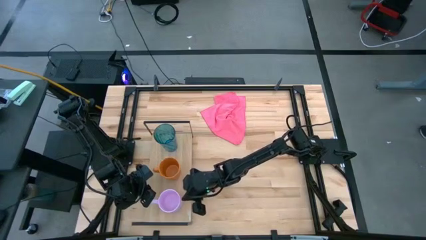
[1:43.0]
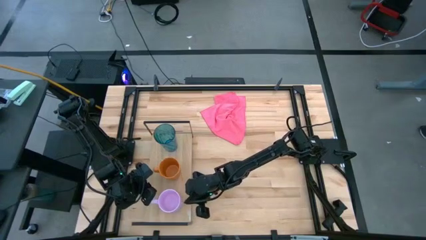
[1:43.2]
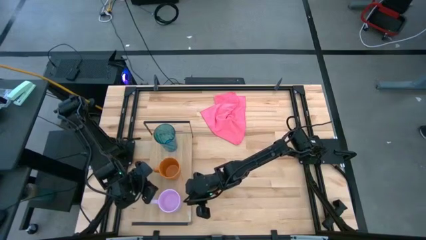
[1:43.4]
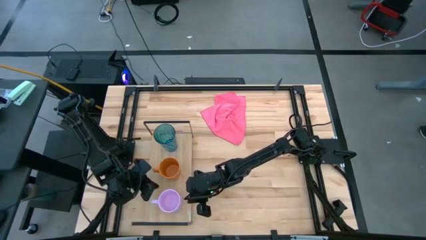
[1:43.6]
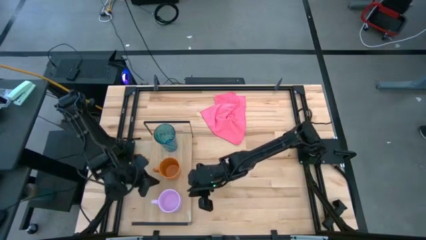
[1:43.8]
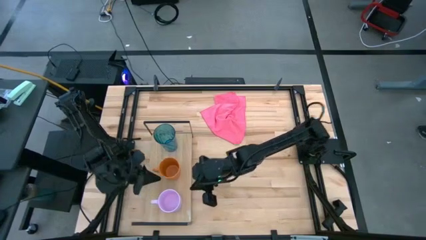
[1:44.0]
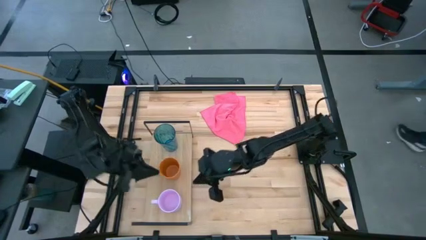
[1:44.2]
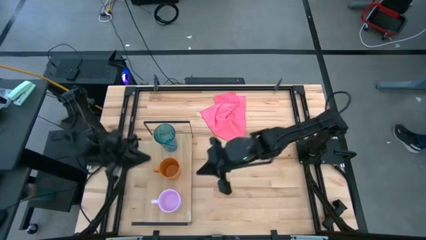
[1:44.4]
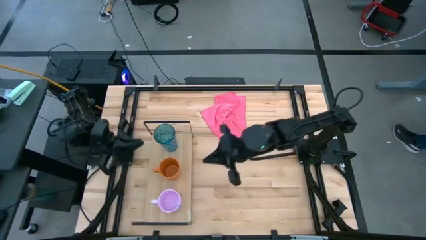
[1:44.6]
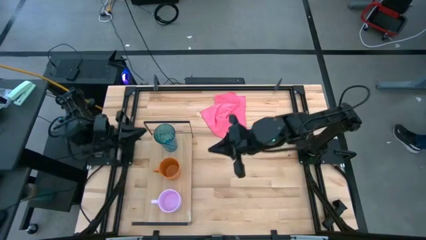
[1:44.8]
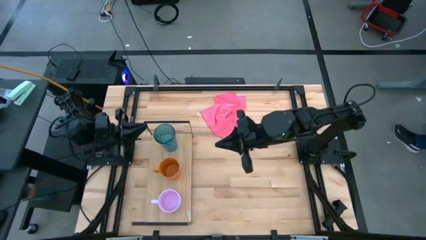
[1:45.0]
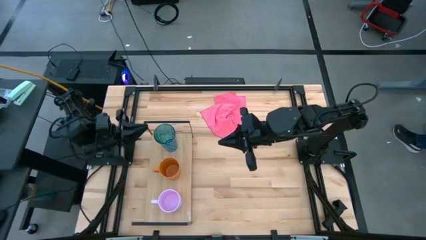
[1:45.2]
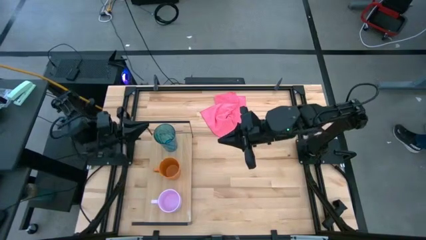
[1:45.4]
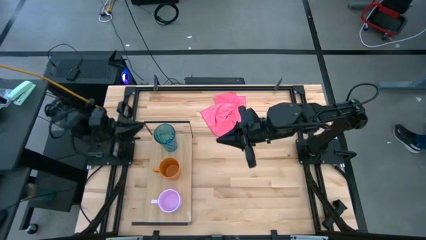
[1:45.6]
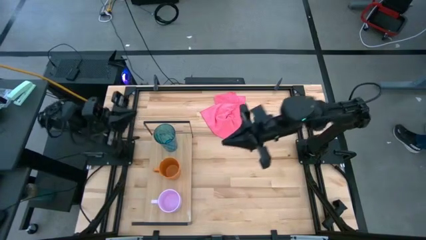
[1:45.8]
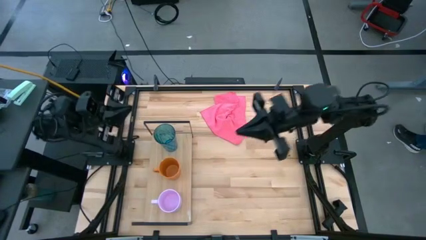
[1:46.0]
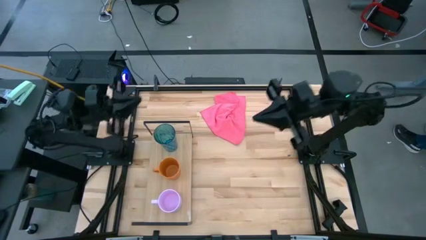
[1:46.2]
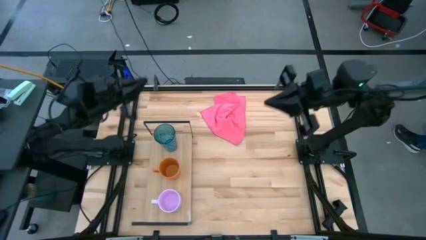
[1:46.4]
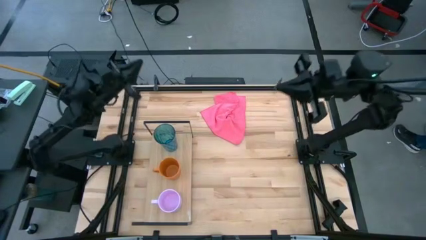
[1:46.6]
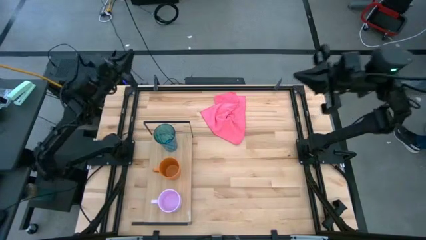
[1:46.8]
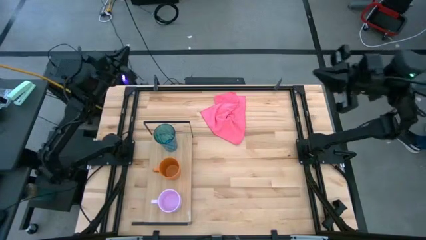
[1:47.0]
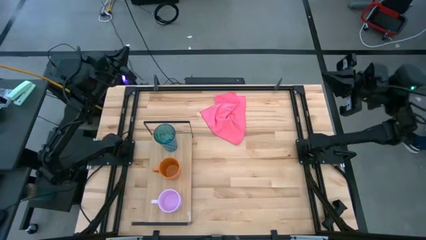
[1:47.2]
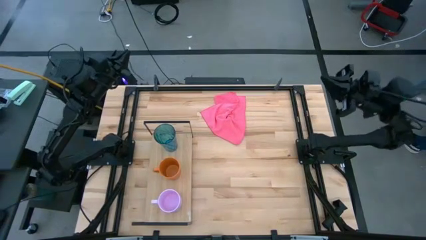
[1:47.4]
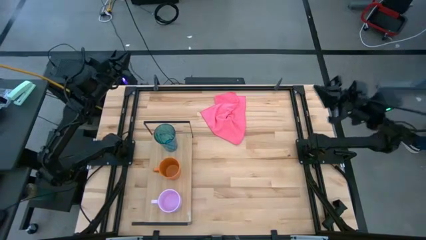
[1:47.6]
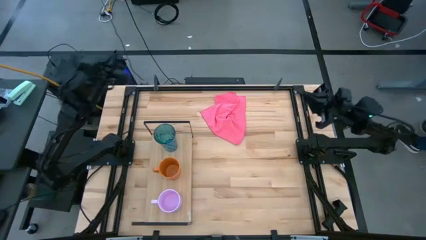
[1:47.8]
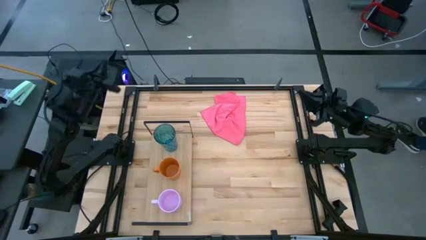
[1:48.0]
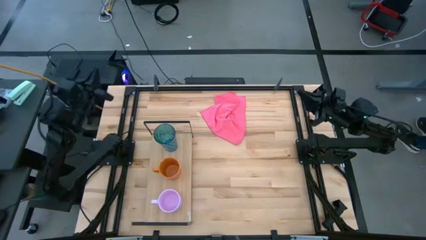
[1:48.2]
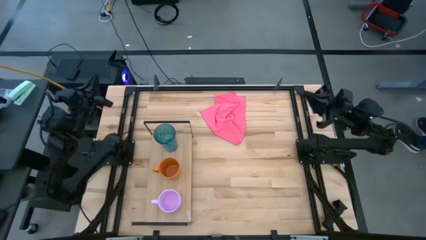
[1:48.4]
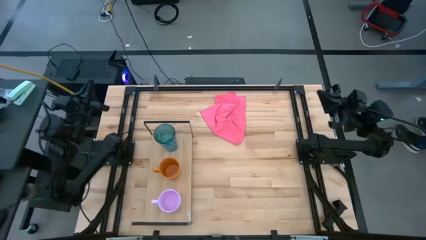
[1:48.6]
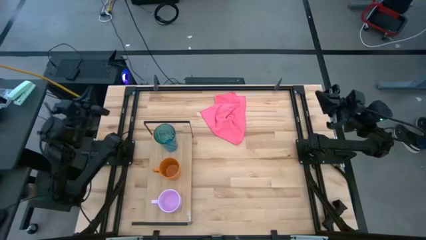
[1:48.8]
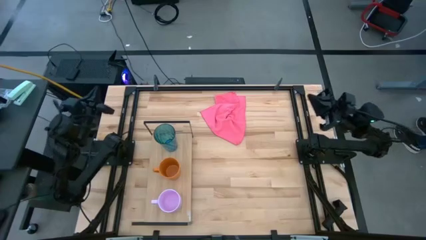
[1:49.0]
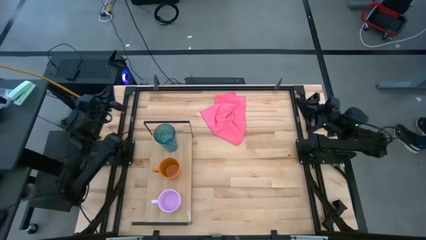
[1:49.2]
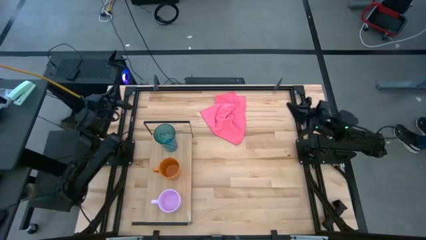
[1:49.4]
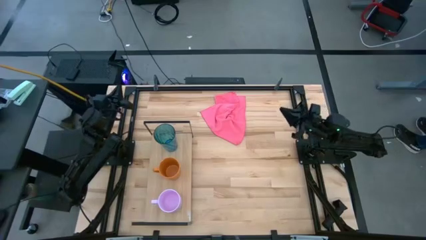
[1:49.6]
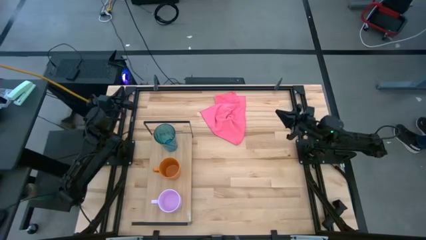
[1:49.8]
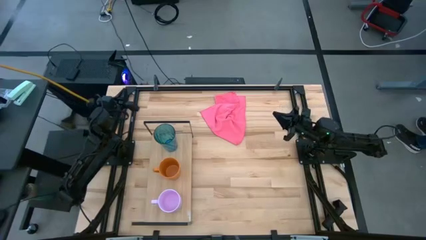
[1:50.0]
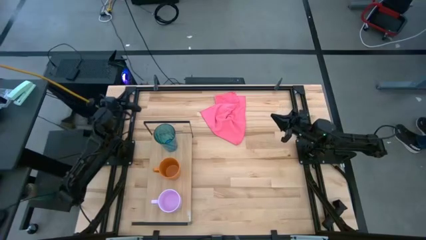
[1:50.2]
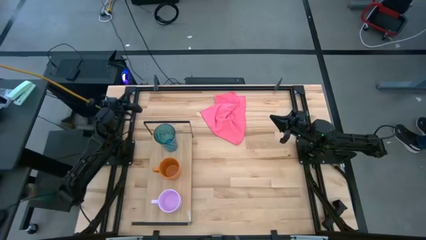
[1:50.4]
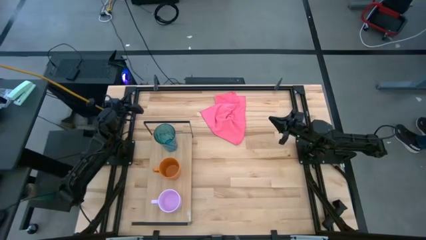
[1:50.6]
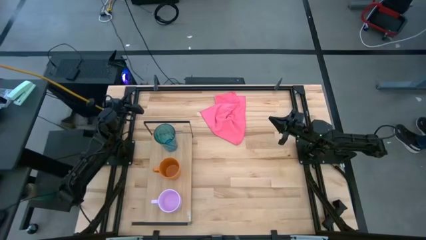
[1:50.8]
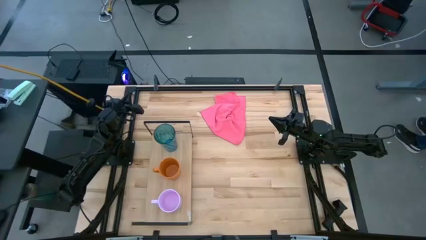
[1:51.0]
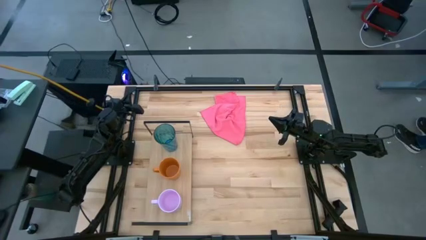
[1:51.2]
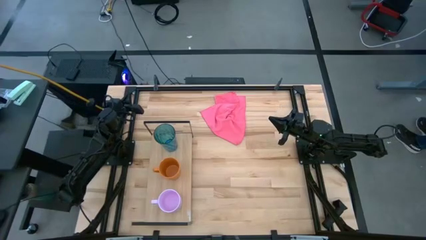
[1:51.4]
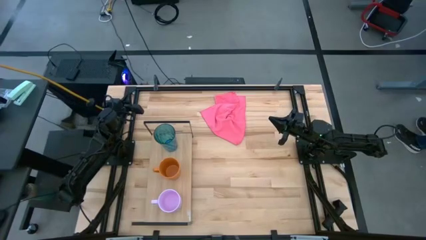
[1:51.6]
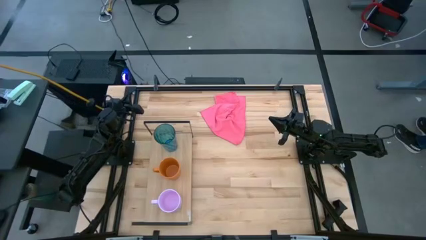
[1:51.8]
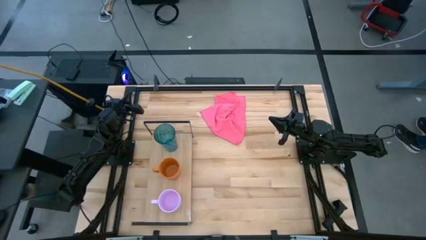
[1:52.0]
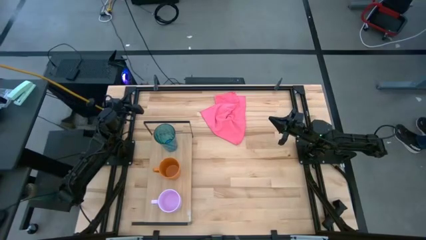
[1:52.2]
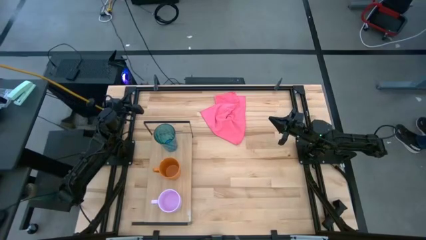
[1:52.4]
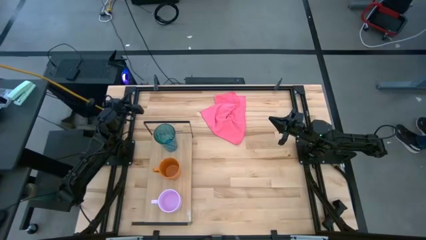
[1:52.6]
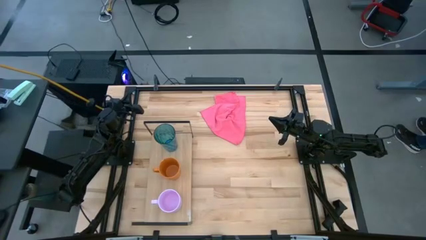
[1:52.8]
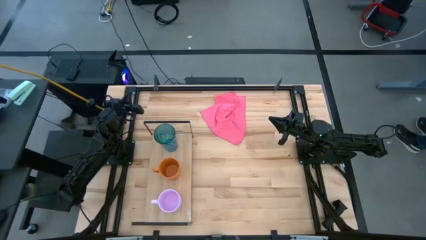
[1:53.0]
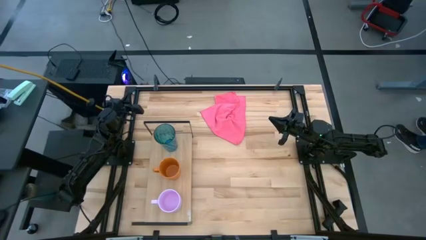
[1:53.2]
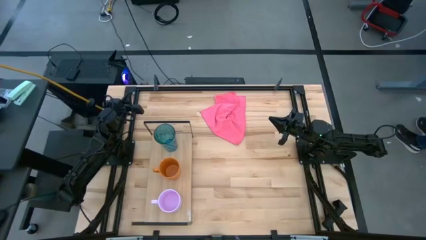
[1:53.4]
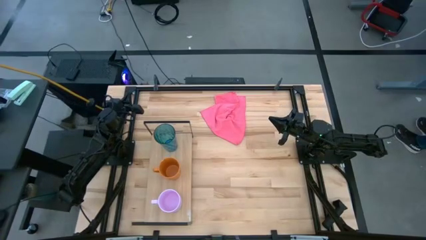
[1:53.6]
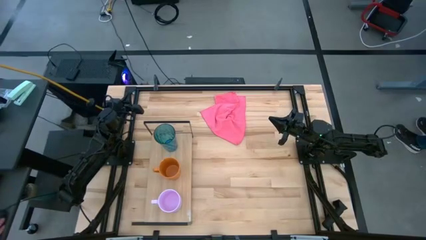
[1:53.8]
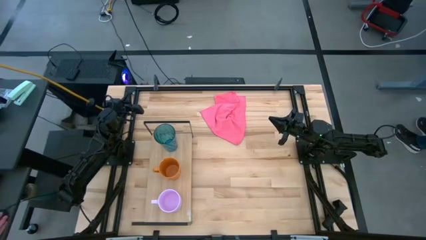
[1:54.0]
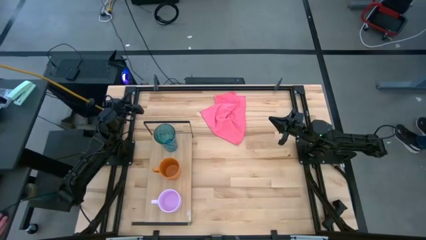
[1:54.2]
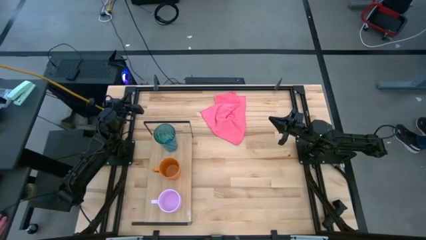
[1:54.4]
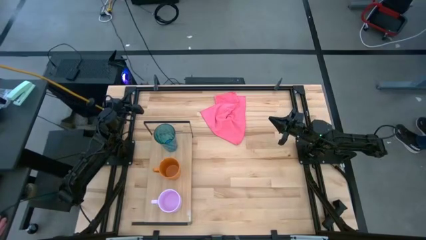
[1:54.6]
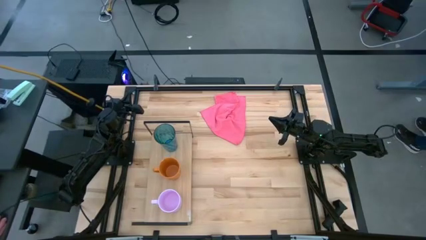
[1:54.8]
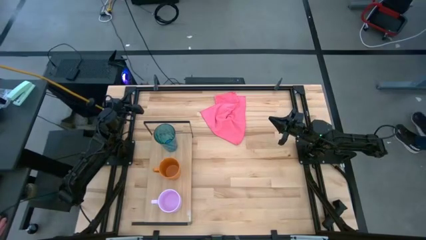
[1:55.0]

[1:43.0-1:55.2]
Task: Stack small to large cups/mugs on shelf
Return to Home Position

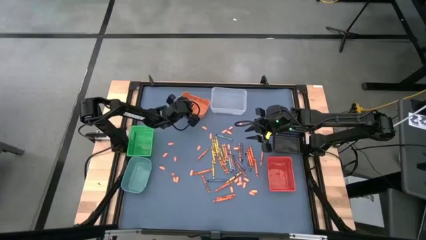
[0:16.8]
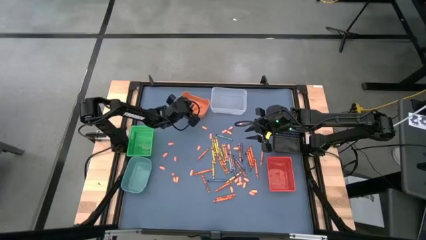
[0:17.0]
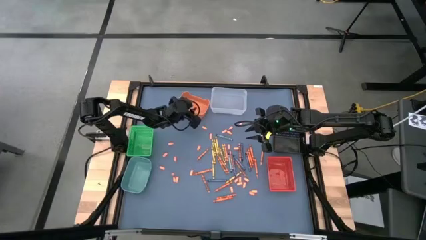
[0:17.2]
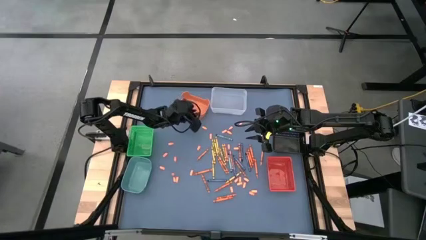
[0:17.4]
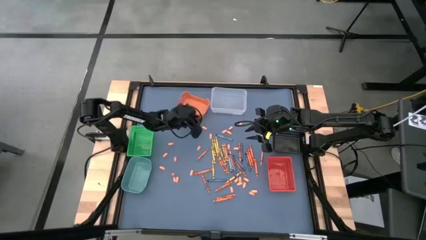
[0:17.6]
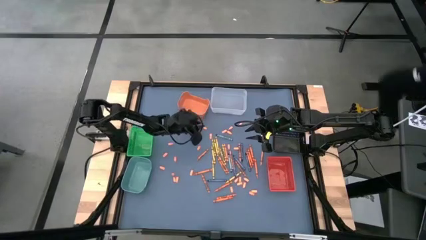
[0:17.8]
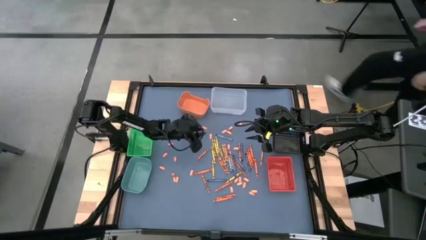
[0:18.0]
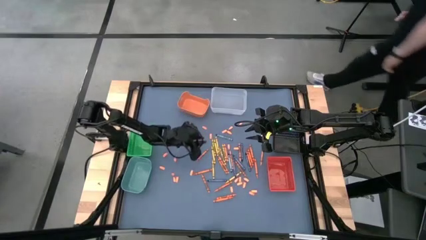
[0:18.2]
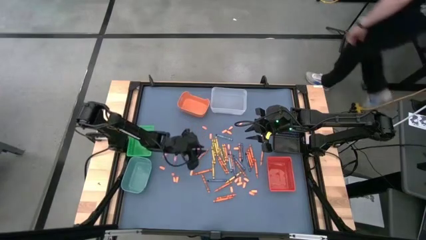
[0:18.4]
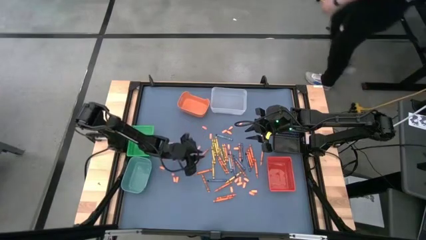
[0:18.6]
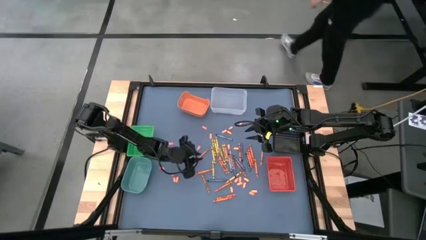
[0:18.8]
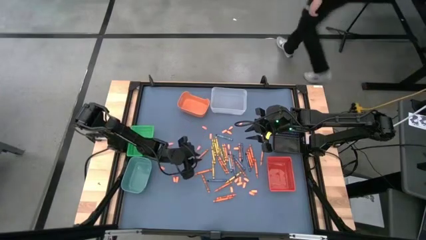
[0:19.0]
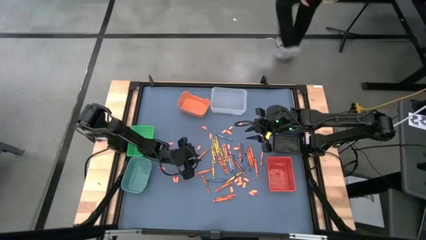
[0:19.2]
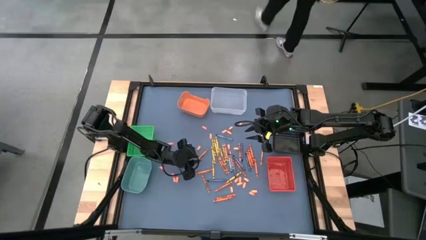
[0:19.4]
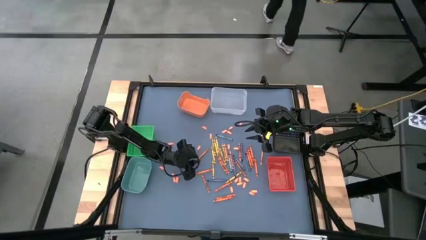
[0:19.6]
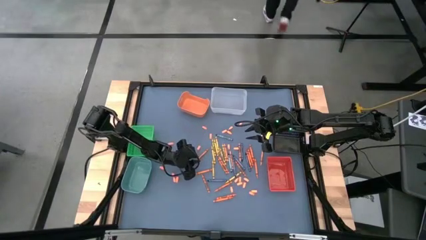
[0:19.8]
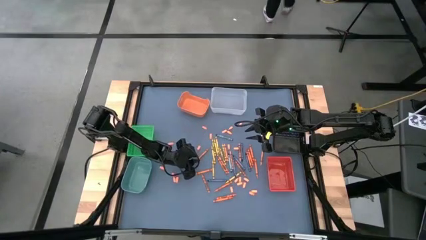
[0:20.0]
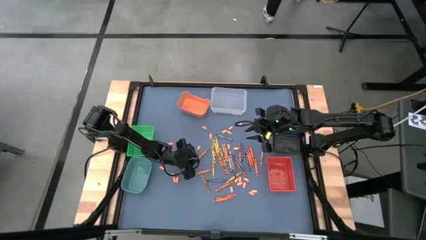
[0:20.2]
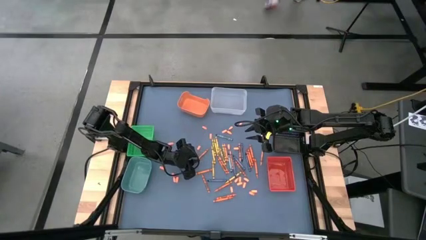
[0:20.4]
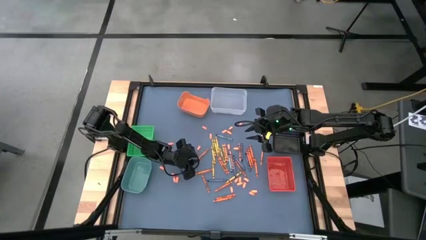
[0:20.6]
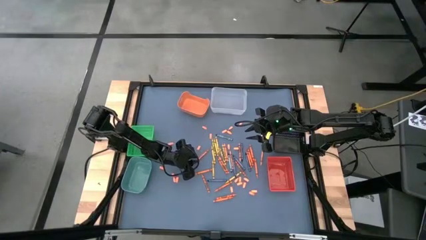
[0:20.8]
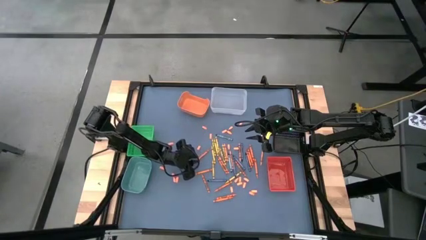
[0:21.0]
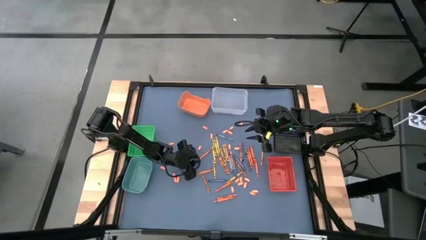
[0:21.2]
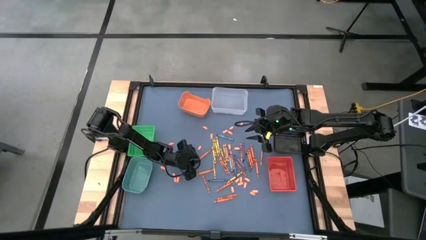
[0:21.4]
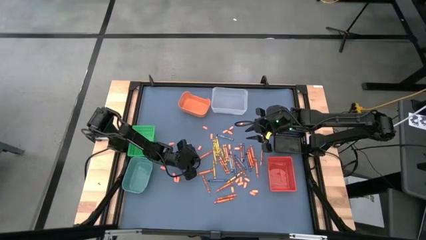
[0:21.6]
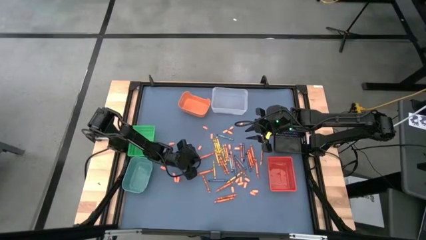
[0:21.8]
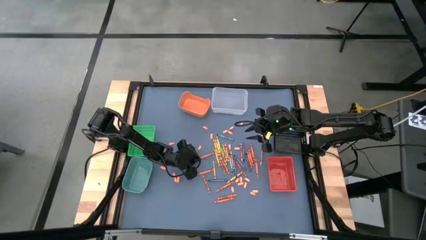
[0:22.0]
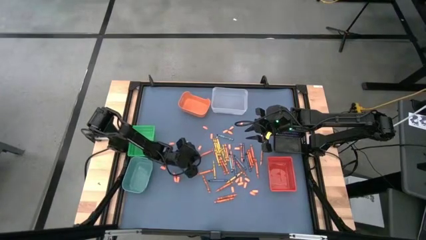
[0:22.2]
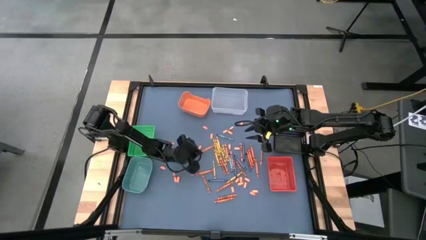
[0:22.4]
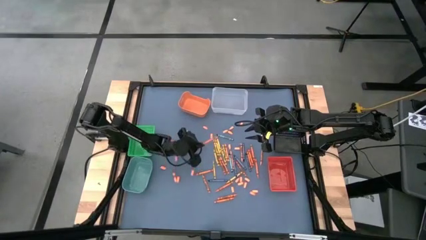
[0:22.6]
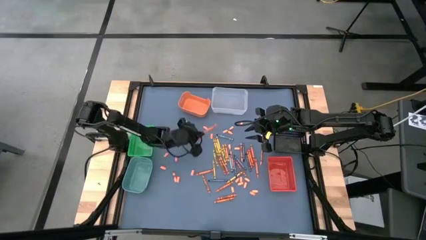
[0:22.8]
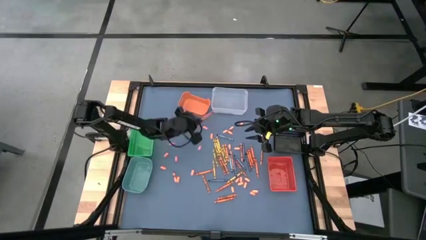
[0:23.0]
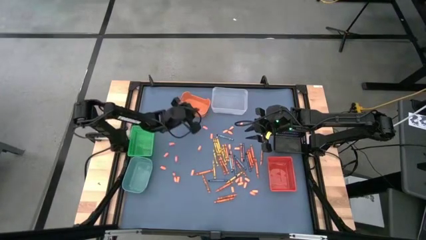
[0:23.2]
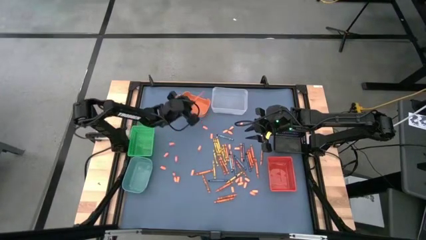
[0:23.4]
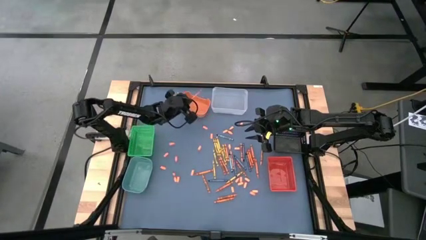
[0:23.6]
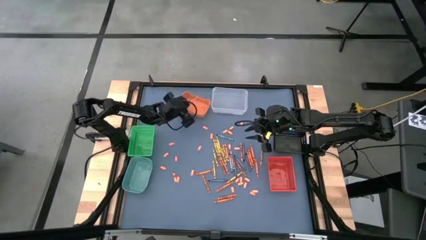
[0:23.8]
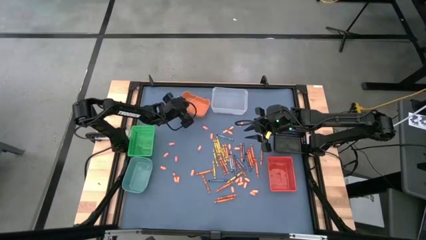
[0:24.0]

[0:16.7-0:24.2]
Task: Sort crayons
Put the red crayon into the orange bin
